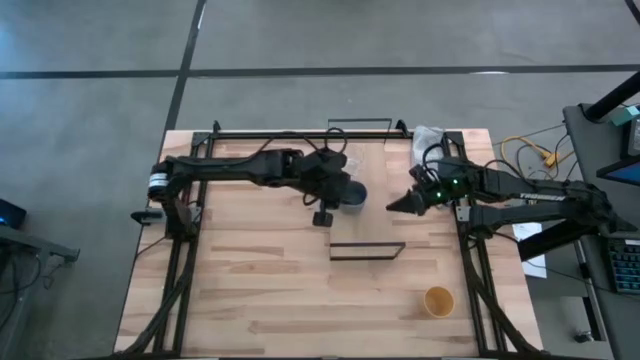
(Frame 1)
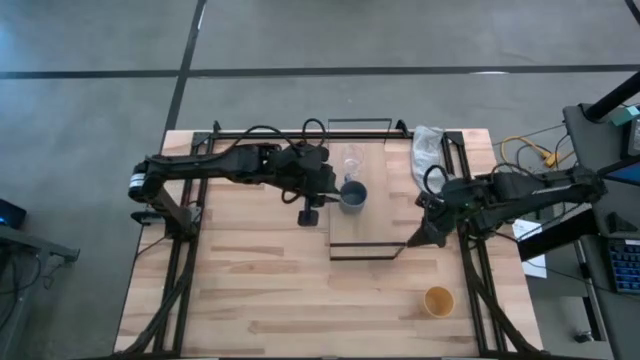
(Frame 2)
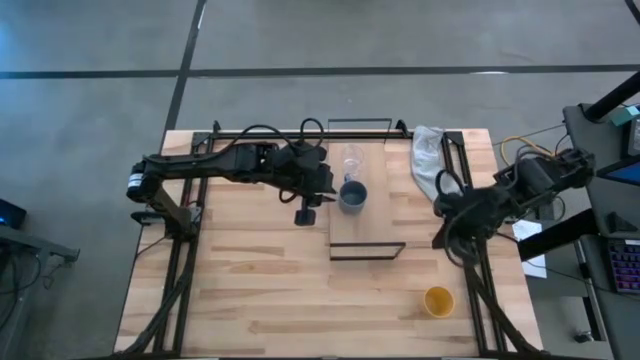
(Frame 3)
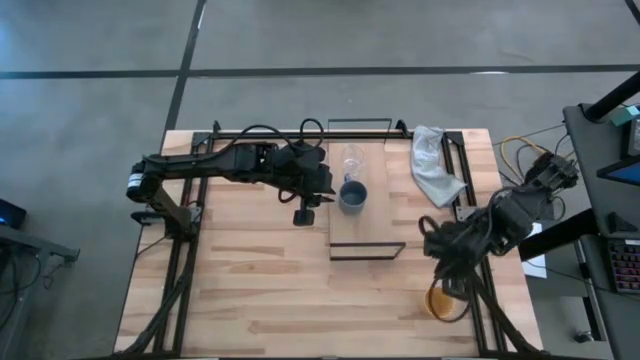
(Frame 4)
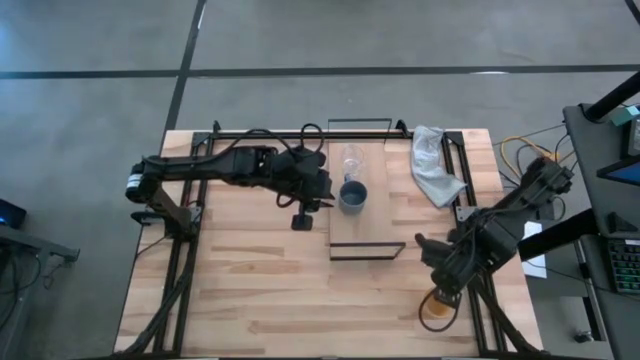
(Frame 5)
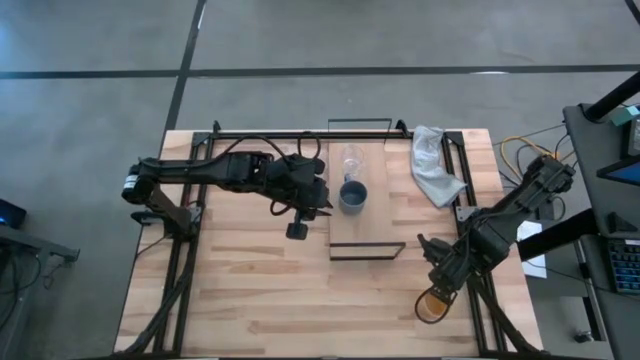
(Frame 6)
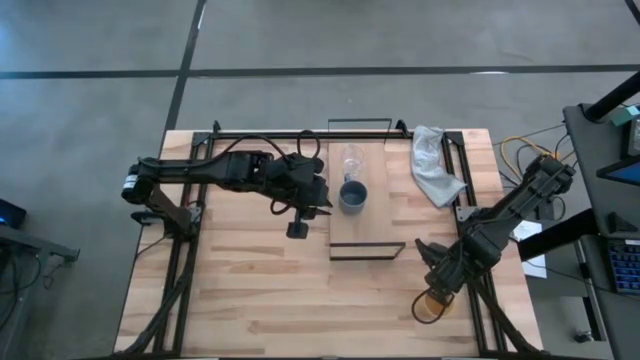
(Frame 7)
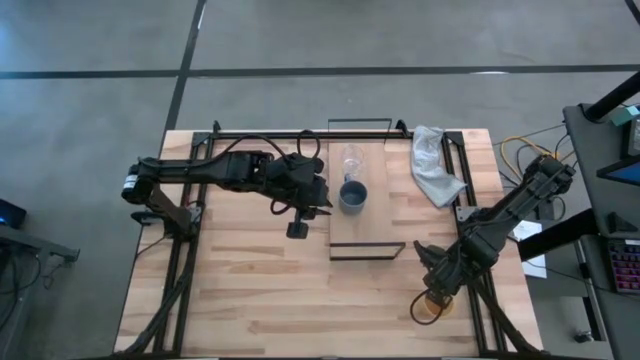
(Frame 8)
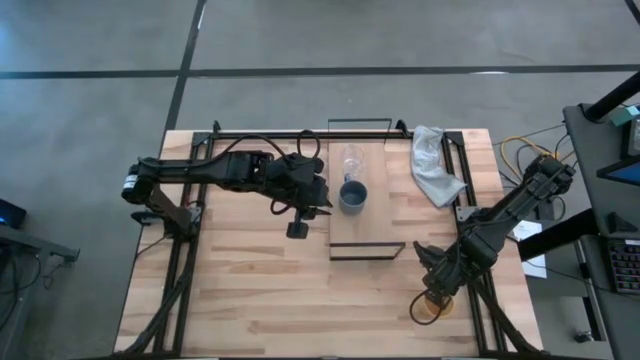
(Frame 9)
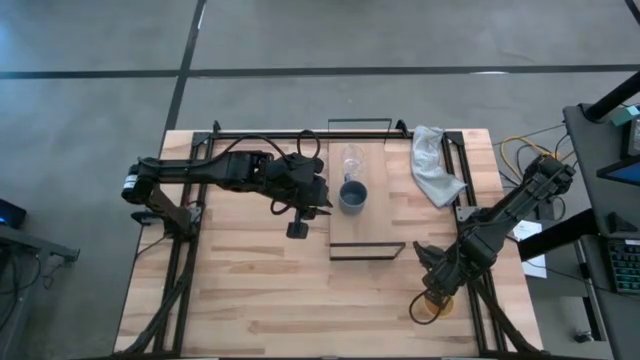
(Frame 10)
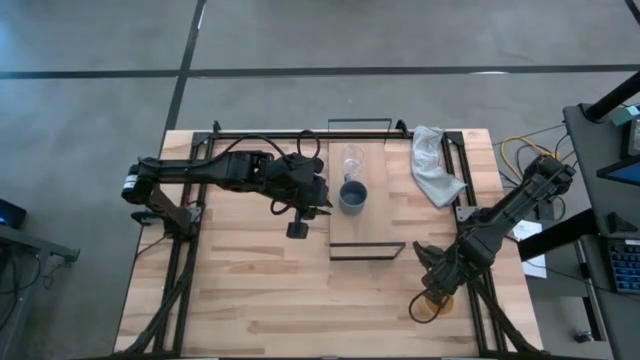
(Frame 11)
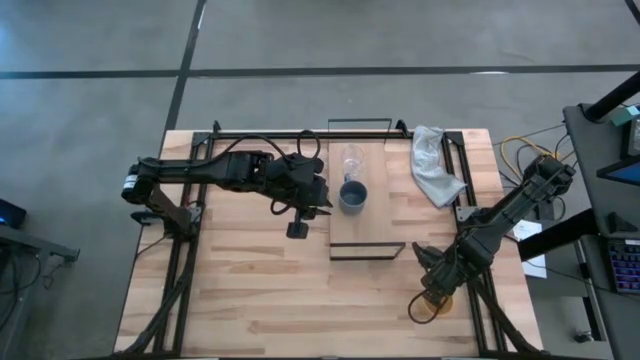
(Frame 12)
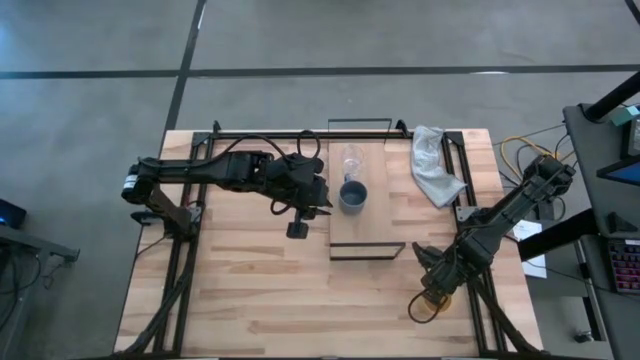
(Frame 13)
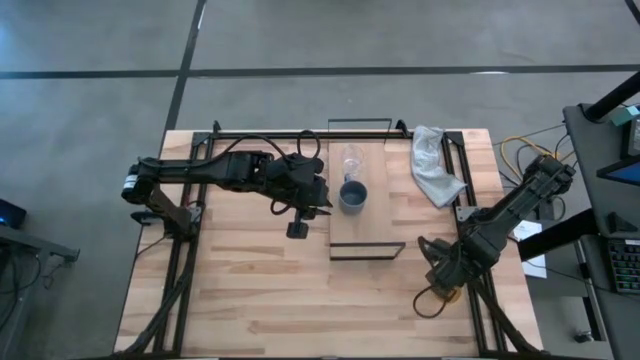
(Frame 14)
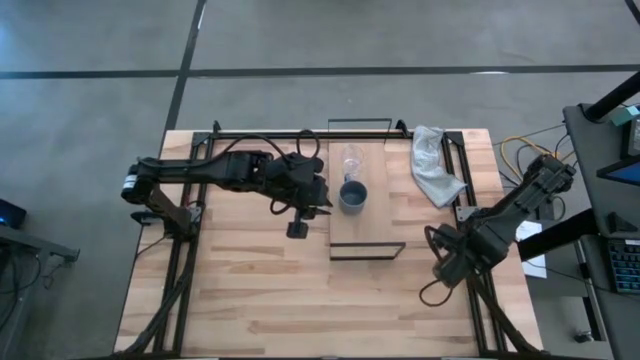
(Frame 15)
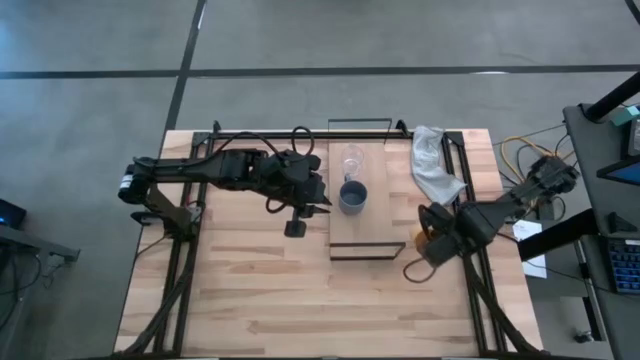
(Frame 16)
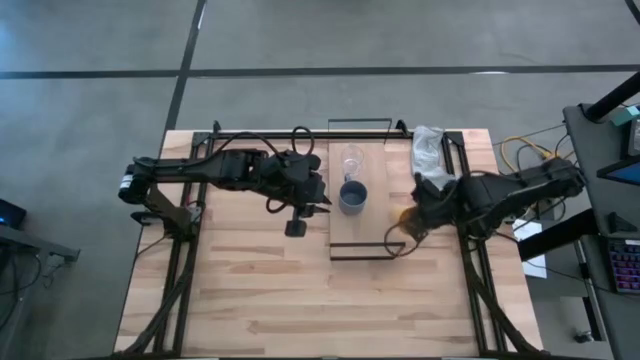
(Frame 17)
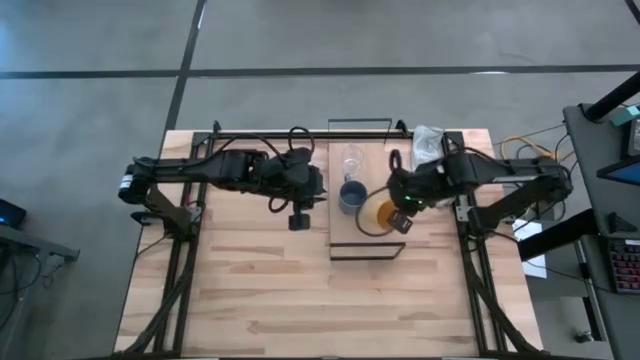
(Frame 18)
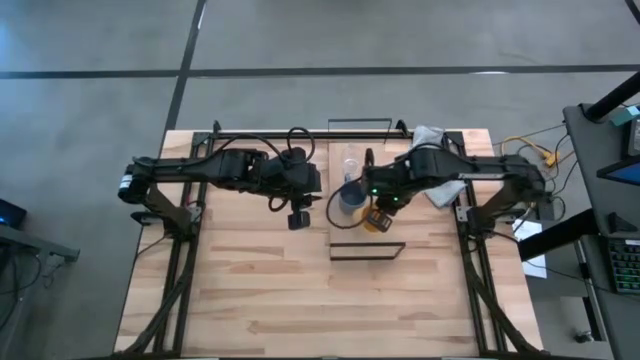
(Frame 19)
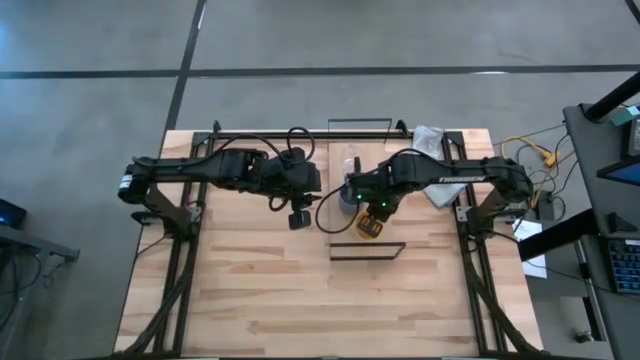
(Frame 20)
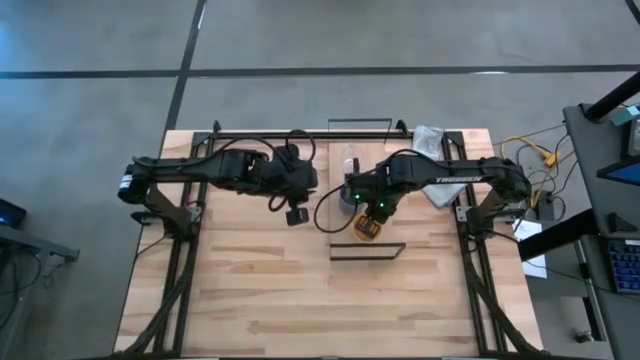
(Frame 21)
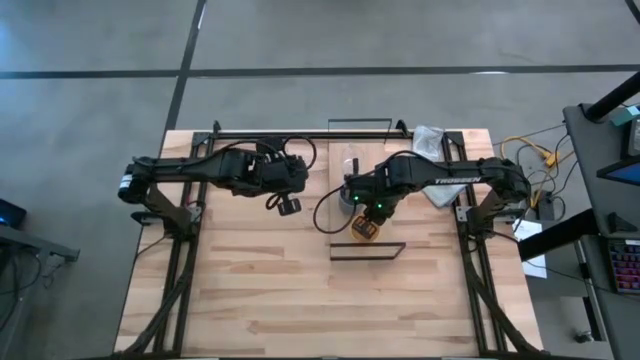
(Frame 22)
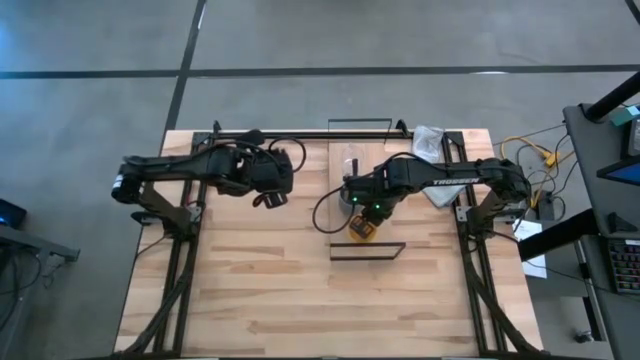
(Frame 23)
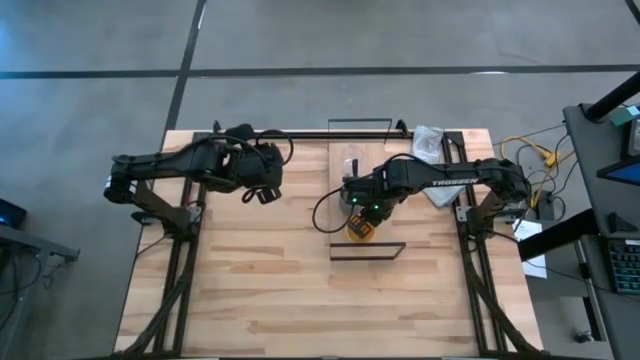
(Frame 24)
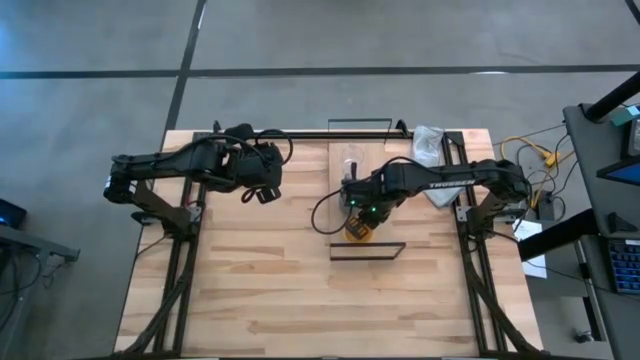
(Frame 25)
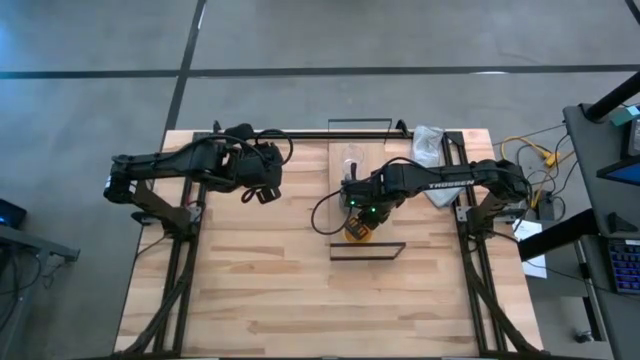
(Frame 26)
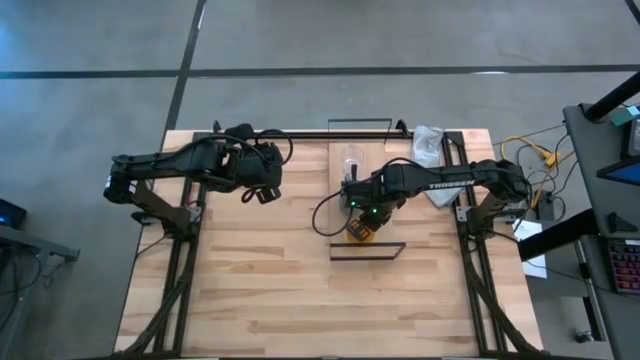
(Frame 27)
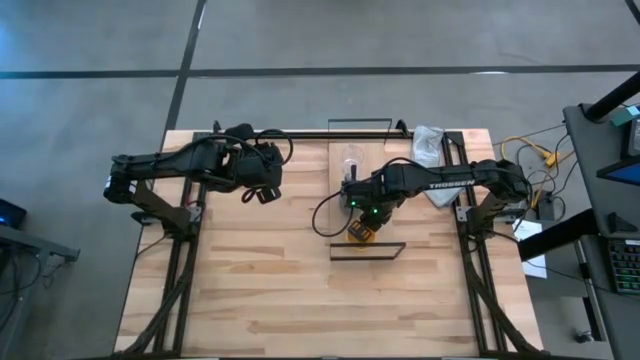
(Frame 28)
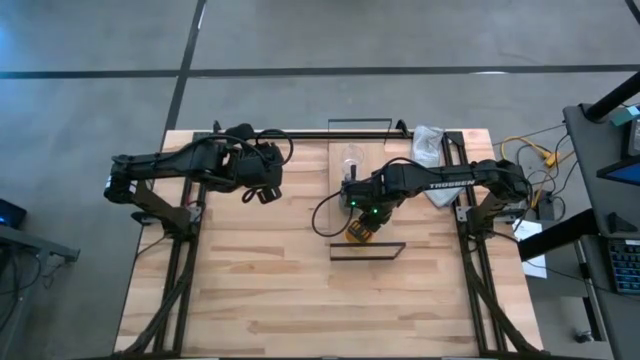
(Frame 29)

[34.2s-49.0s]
Task: Stack small to large cups/mugs on shelf
Put the yellow cup on the shelf

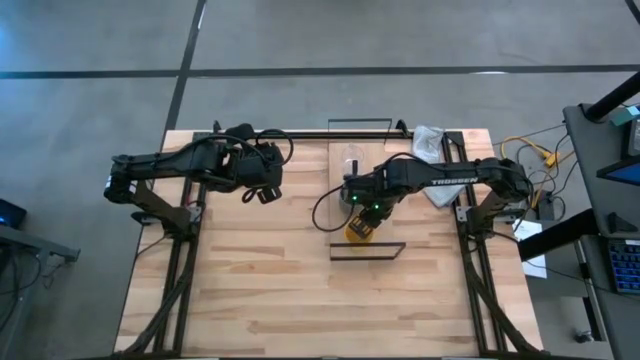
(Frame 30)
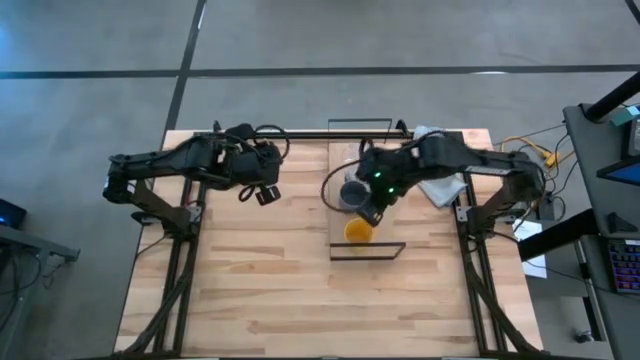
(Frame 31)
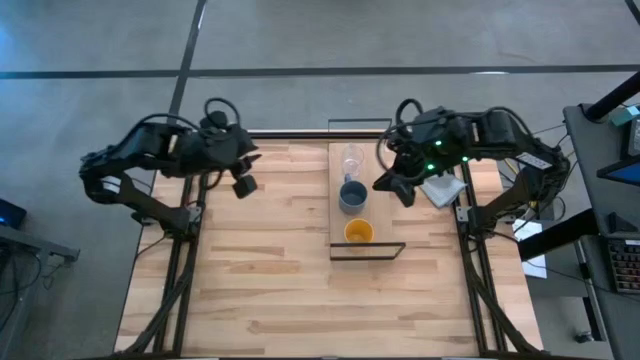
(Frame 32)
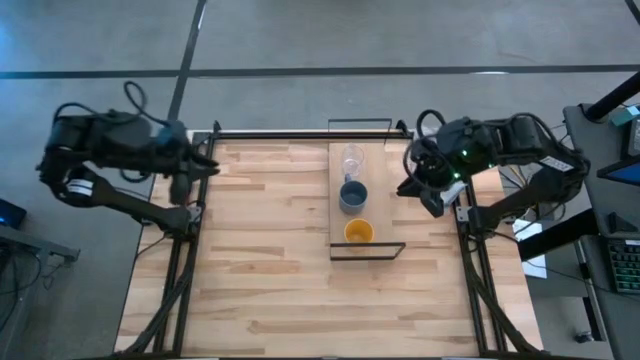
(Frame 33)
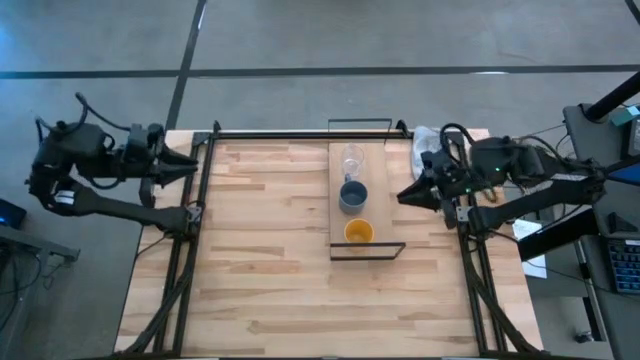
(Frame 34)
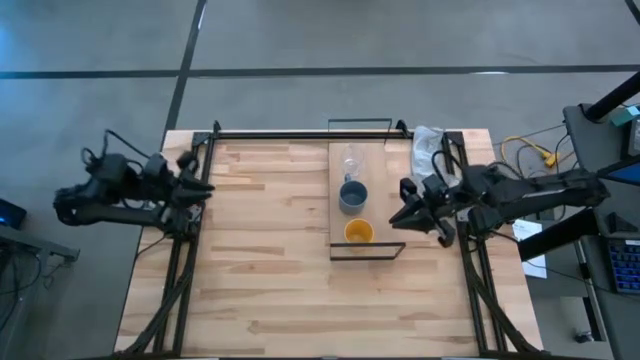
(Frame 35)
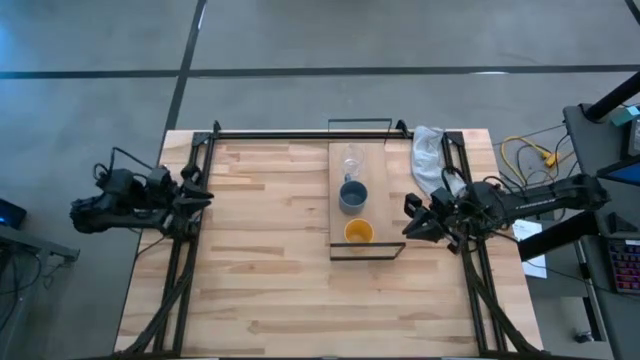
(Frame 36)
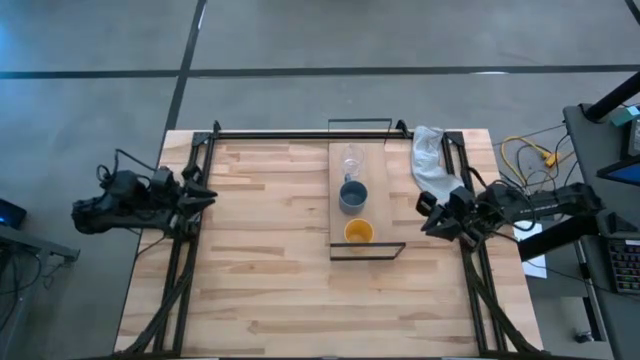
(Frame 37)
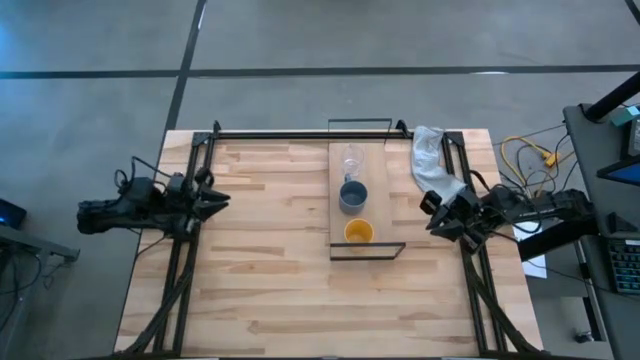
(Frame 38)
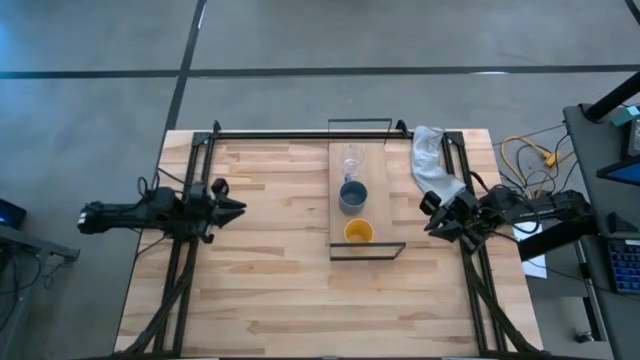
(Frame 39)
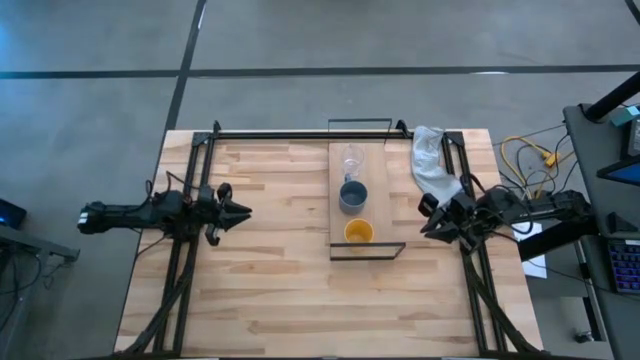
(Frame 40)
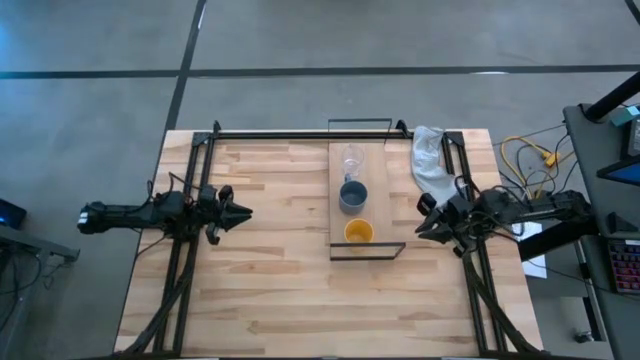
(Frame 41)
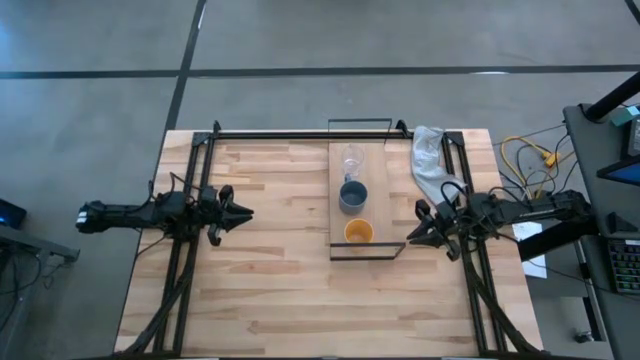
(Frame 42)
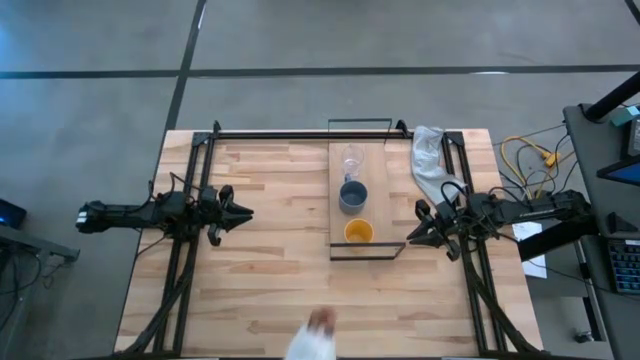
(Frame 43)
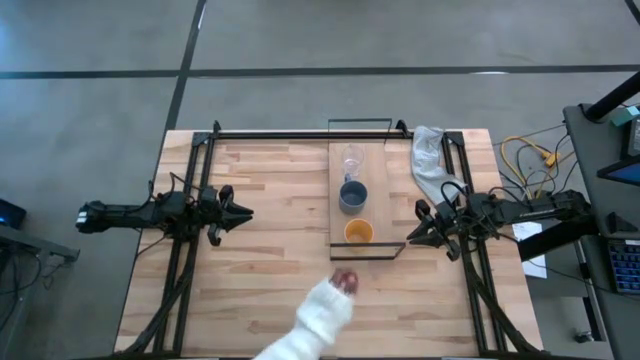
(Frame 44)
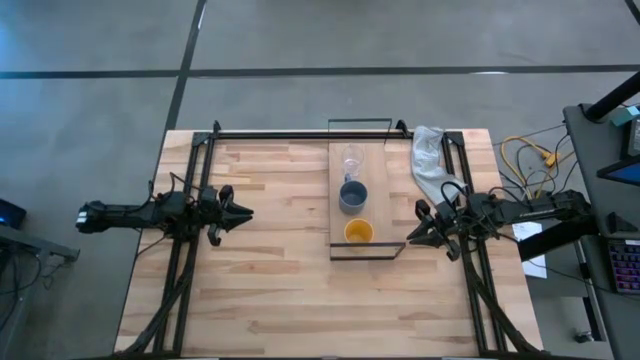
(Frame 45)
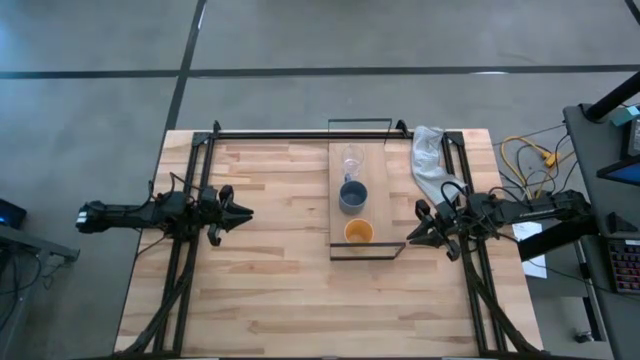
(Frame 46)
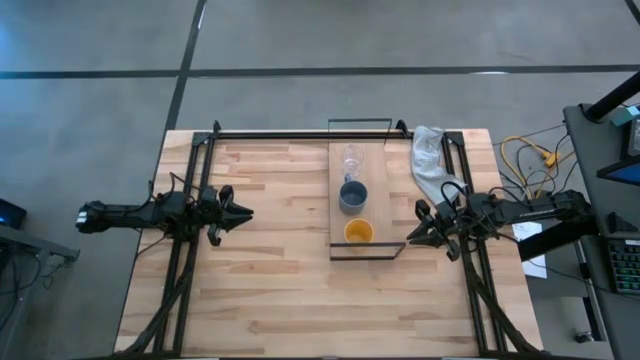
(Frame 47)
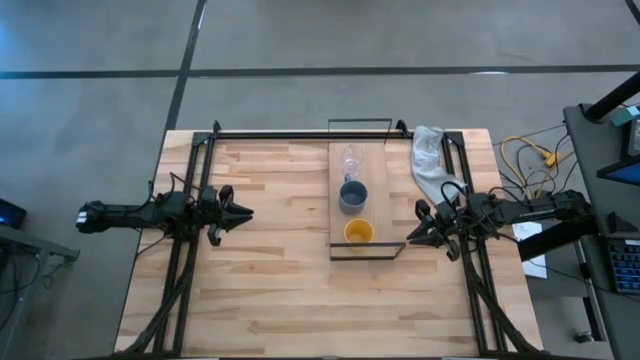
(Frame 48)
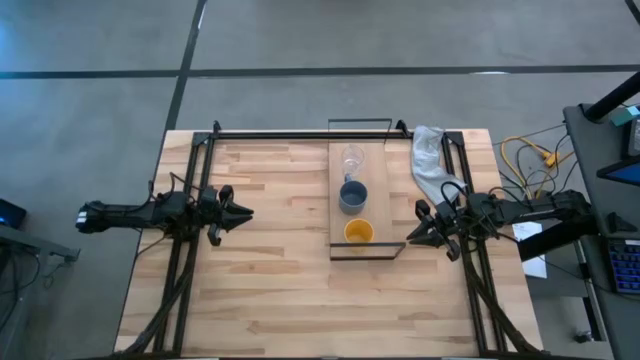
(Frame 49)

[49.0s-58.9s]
Return to Home Position
